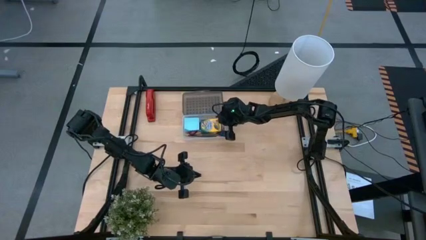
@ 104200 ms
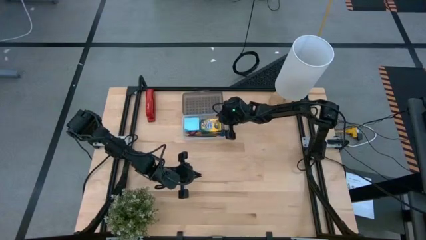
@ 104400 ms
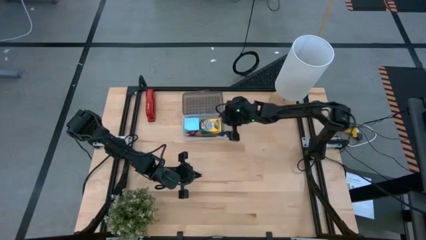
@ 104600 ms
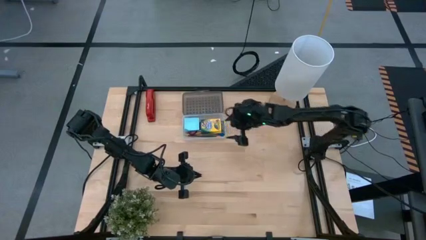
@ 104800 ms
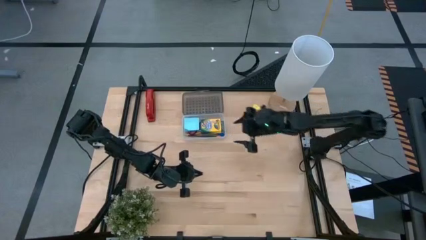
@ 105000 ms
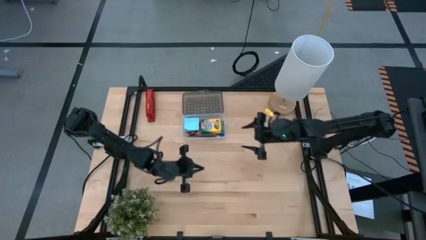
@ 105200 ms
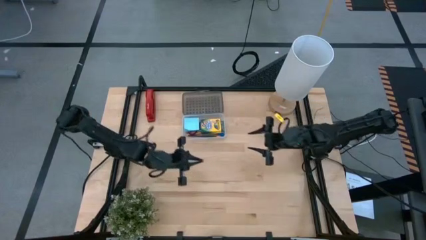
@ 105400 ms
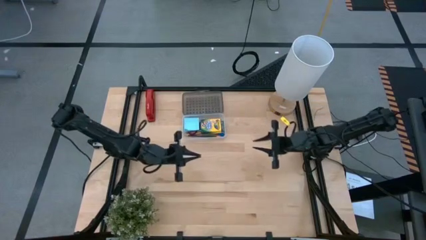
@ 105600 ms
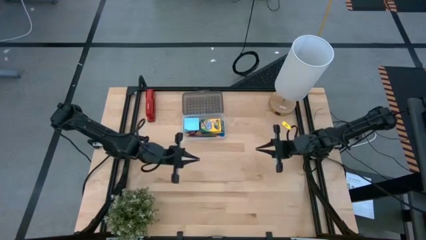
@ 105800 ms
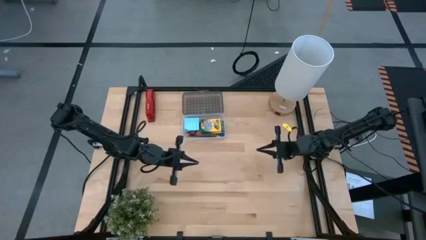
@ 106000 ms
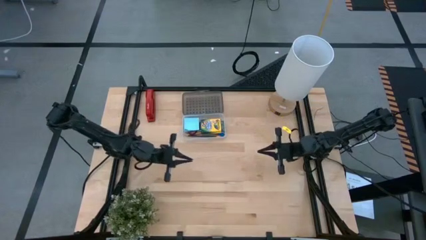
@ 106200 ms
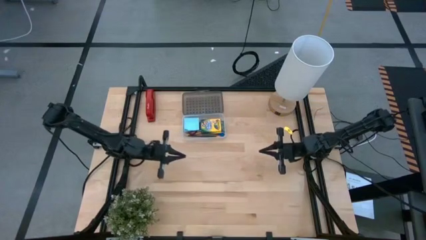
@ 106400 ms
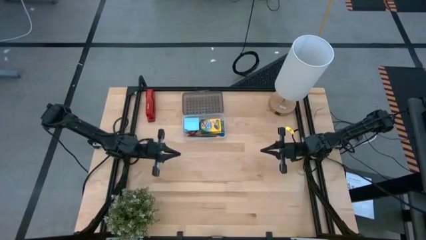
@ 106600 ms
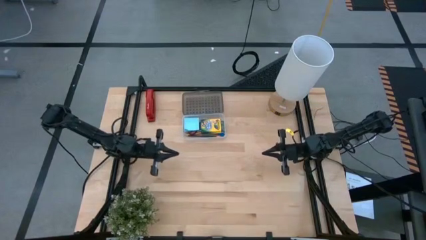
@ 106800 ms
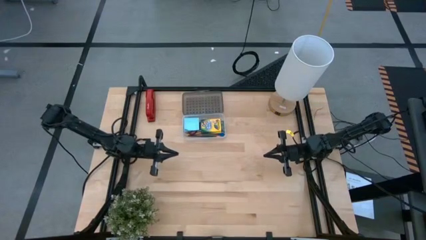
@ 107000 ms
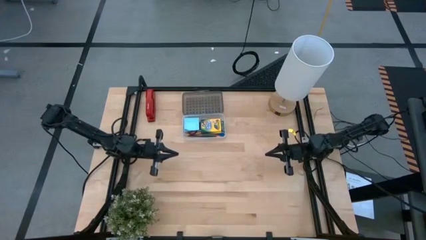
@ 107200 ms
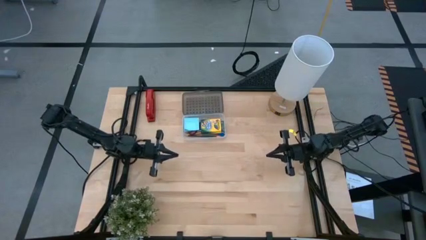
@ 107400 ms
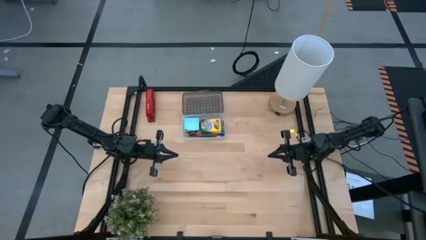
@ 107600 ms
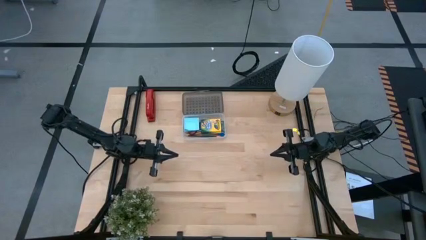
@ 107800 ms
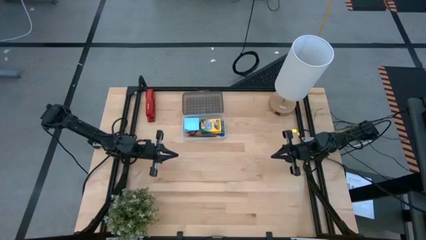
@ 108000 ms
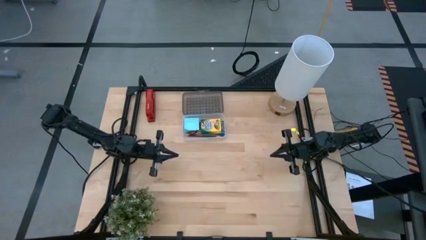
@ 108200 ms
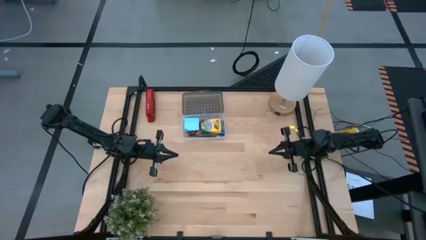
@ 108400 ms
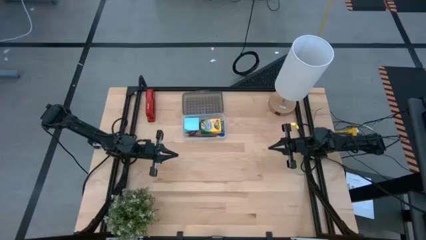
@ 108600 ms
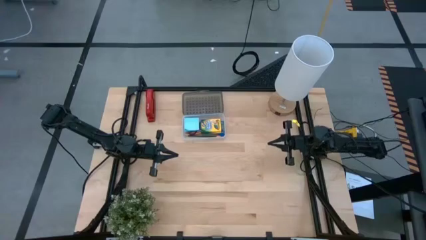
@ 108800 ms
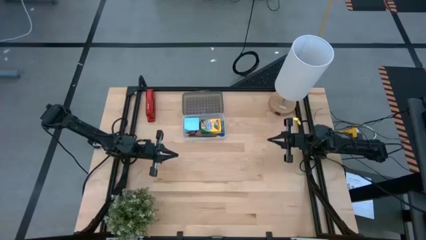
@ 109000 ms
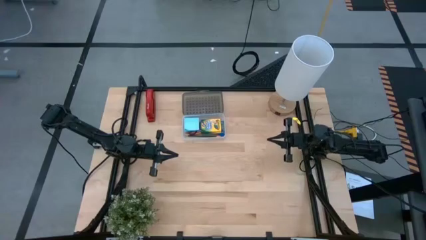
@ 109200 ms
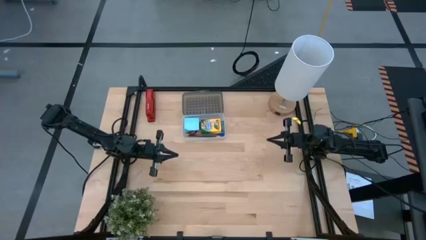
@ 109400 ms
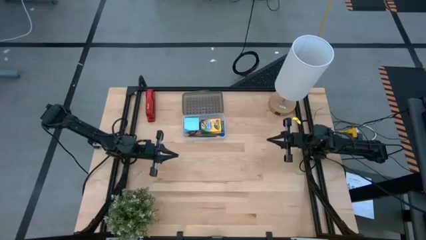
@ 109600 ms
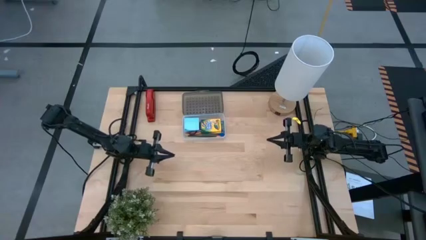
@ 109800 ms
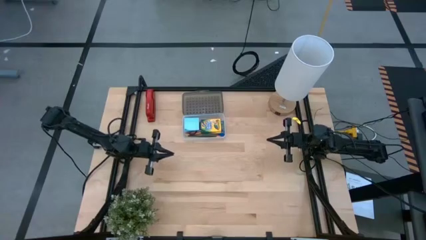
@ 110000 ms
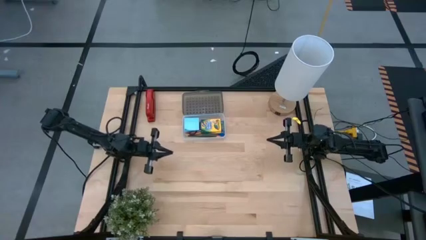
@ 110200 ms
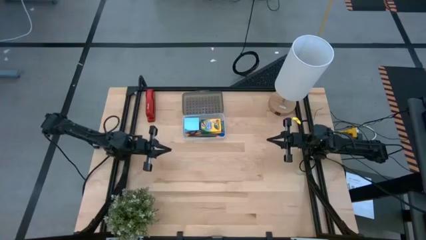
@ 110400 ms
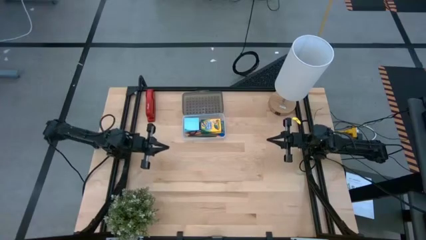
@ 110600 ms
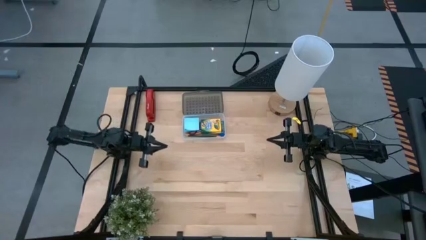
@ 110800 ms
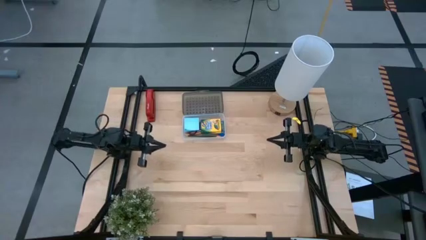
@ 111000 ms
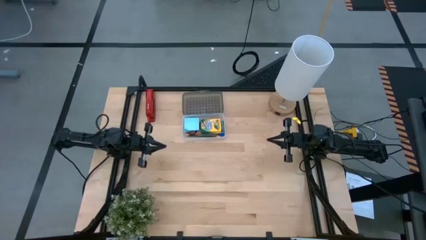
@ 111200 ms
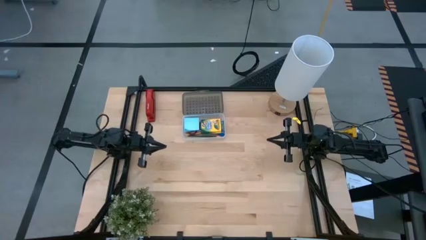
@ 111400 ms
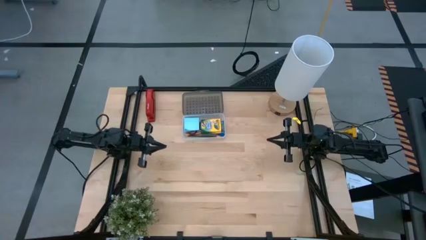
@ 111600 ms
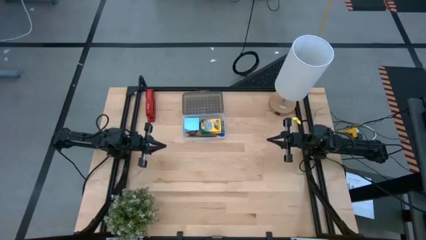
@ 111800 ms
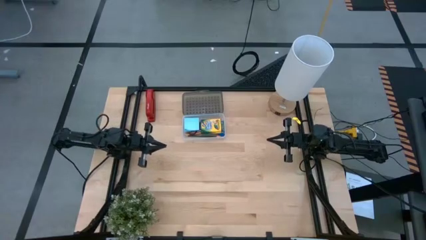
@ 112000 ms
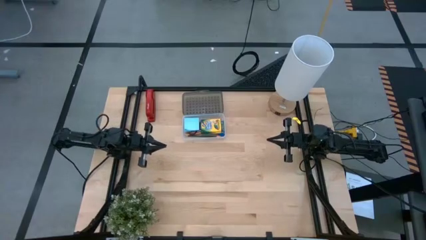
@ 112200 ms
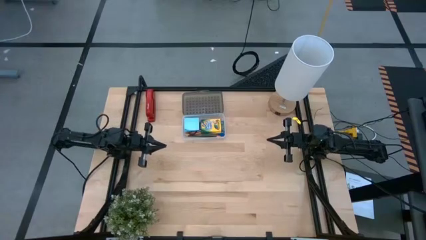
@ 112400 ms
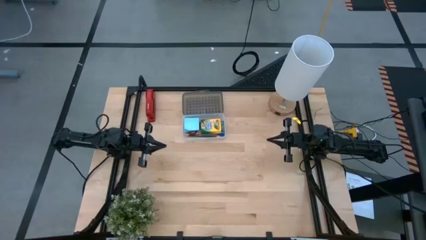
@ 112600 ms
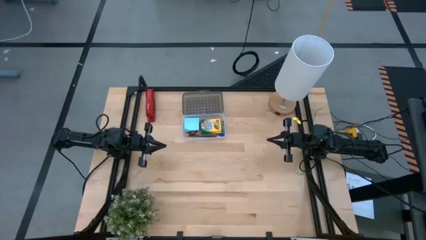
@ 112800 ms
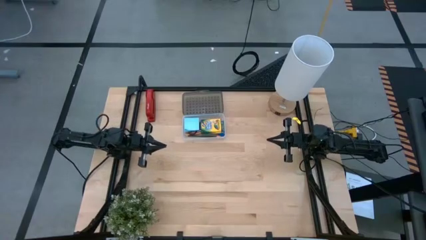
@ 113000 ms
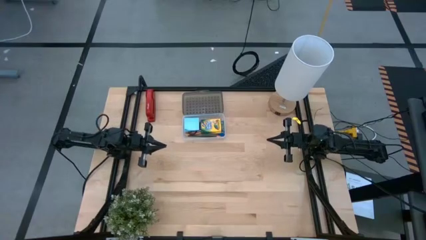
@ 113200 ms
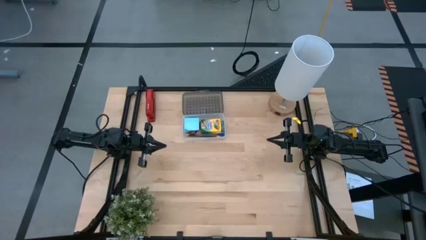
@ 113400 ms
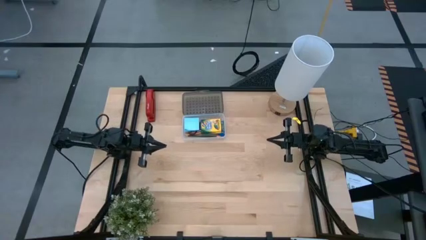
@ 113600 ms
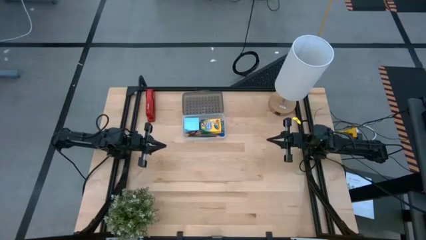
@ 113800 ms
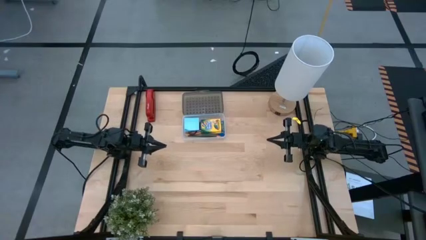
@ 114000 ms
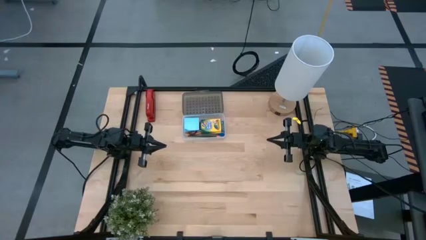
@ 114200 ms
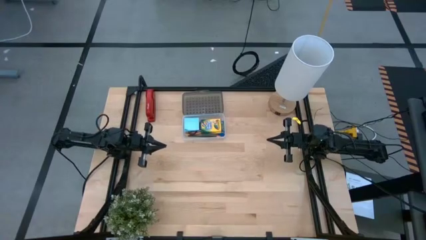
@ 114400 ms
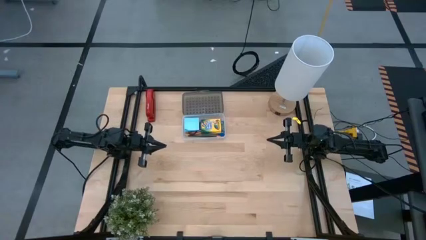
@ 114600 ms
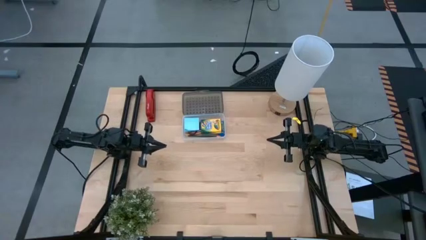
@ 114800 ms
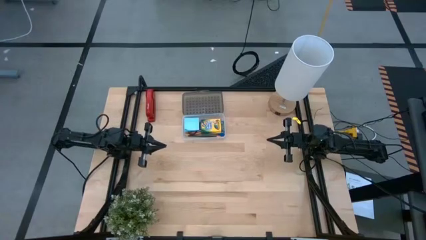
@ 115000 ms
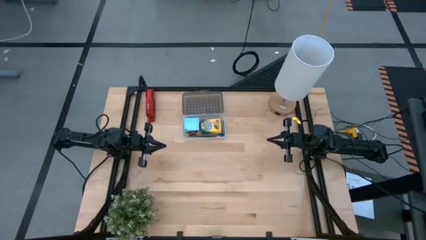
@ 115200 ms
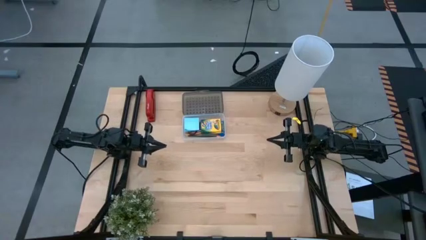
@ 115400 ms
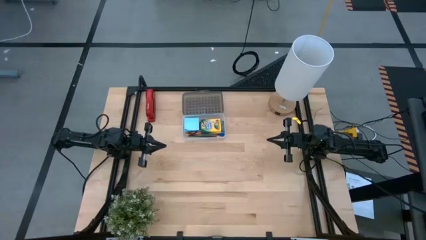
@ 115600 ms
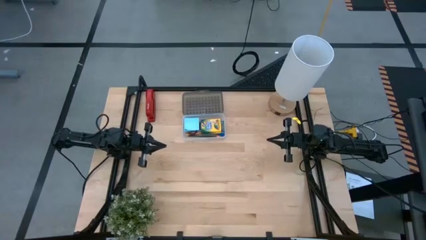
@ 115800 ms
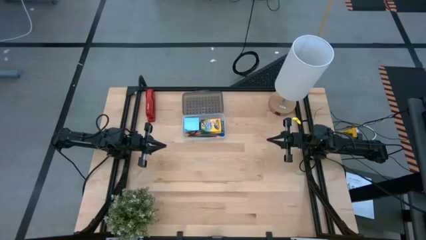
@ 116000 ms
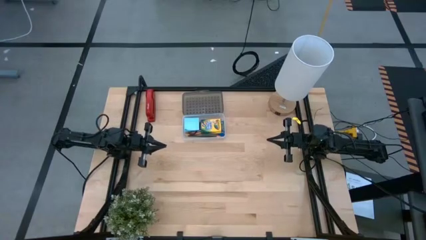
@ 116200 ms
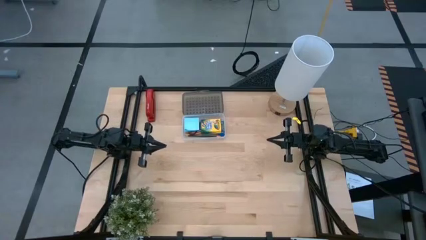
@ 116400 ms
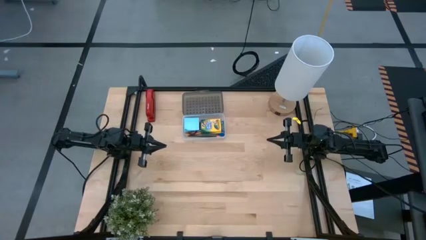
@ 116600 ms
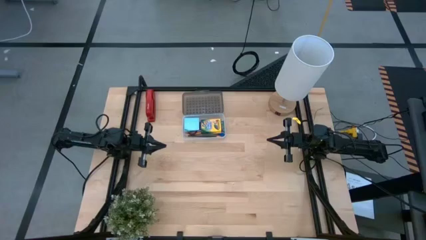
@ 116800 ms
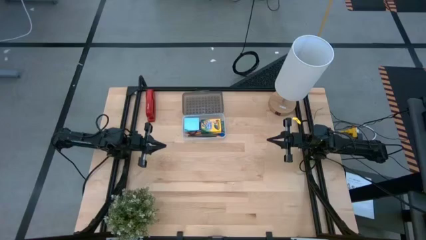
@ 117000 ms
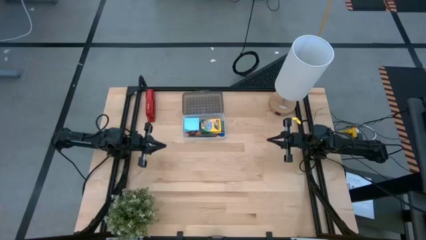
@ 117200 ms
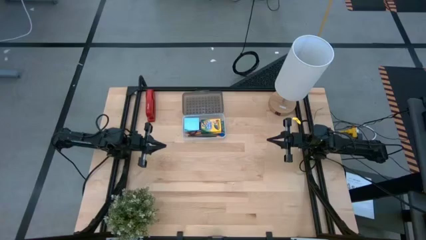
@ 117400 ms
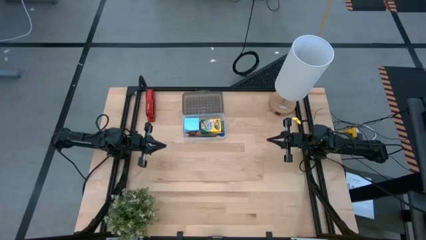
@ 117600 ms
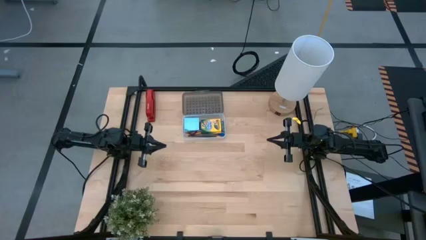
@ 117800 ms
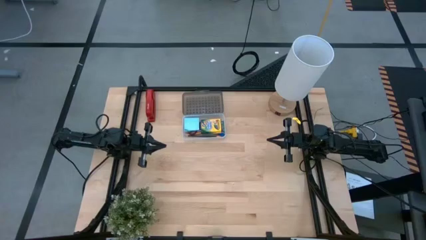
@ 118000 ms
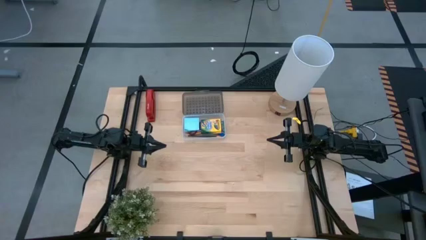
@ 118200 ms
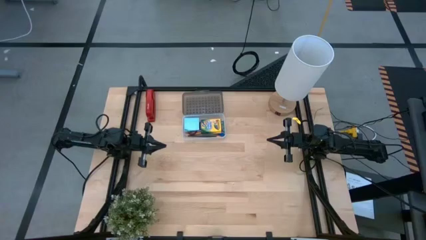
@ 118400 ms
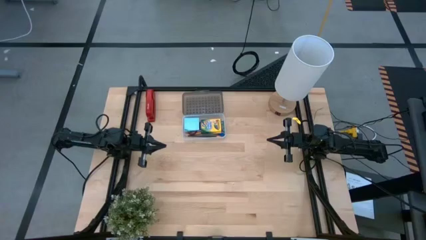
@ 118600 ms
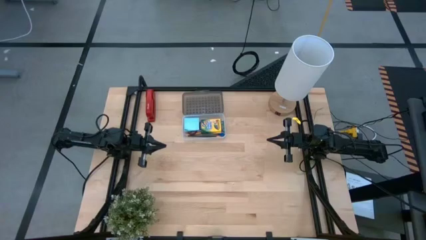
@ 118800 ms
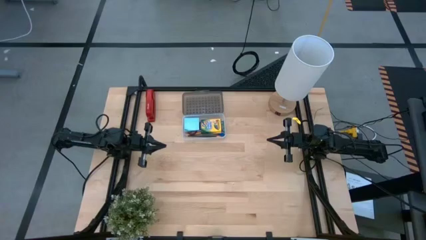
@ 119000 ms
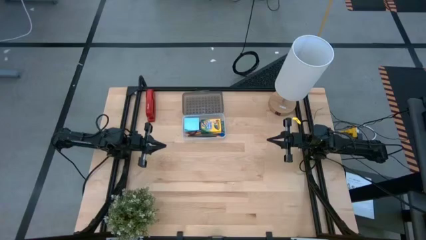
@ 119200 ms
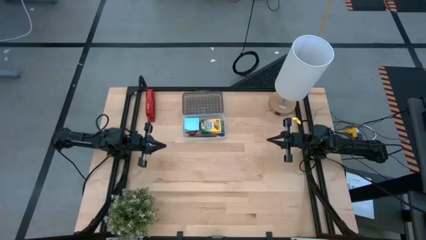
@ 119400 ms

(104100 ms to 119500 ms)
Task: Pack school essentials
Return to Home Position

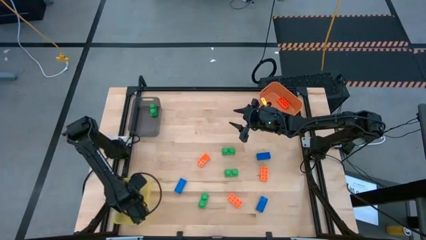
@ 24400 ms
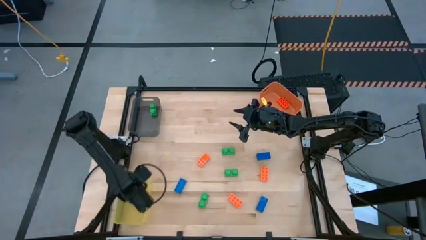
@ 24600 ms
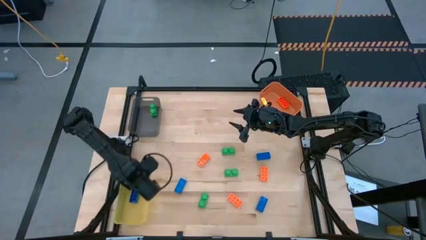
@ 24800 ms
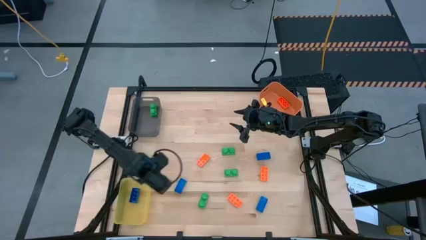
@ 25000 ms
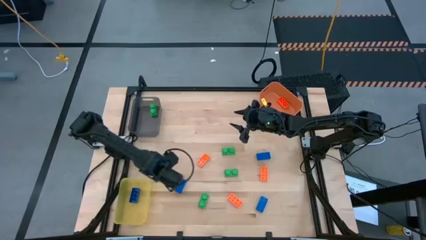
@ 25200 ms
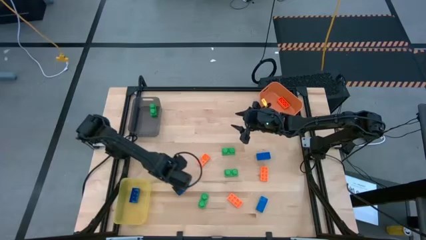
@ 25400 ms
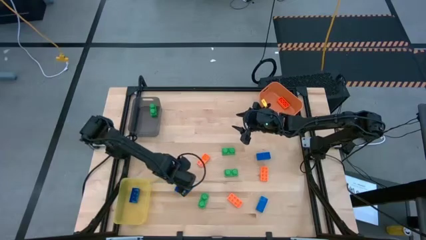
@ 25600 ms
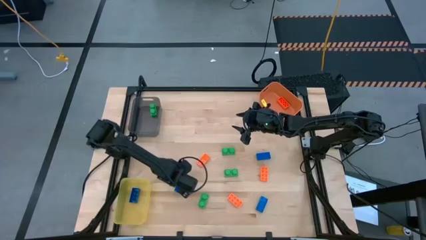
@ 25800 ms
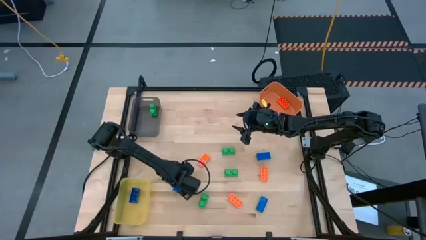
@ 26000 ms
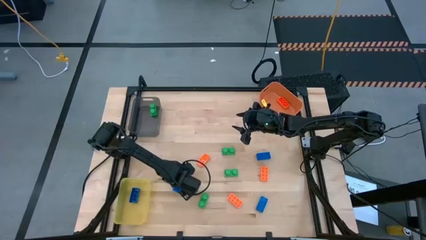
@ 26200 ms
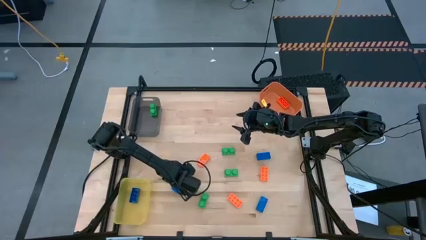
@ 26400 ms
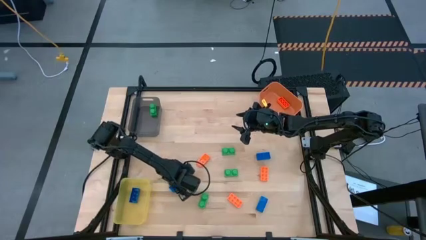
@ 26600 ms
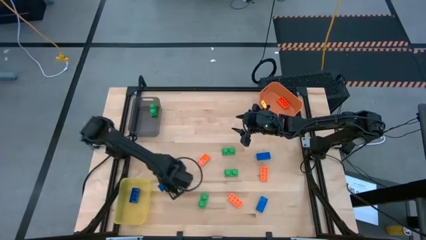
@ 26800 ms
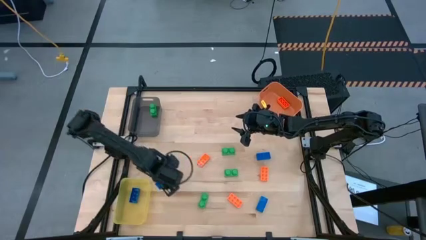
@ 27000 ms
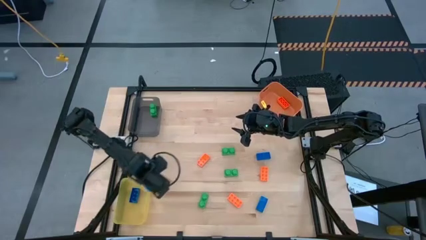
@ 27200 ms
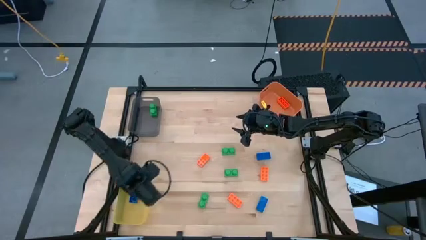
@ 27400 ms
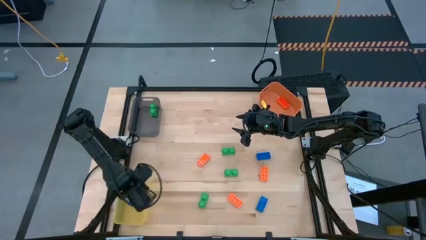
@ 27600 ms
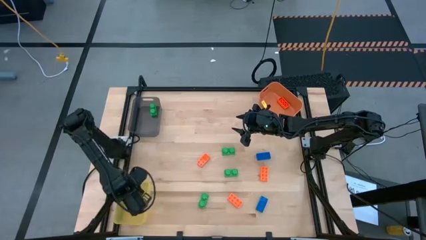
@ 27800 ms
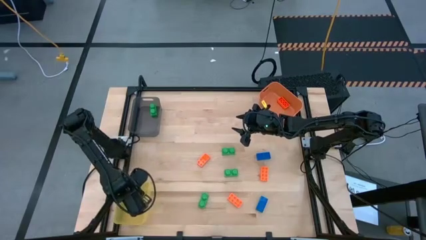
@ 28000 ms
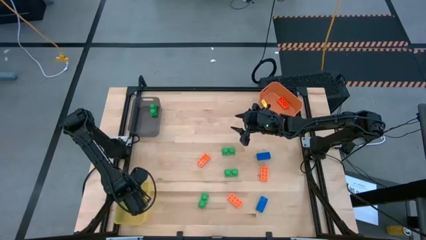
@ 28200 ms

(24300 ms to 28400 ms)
Task: Sort & place blocks by color
Put the blue game piece into the yellow bin
